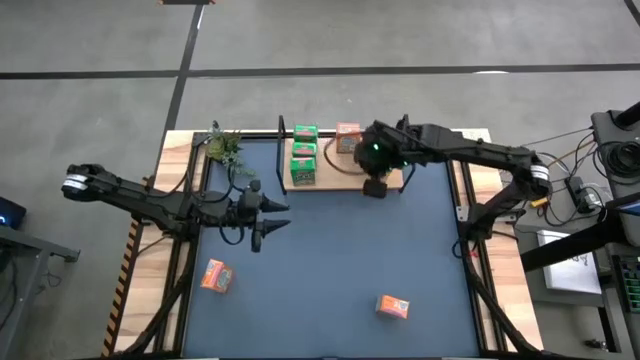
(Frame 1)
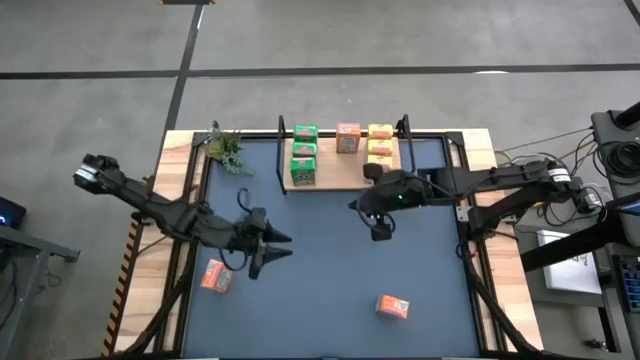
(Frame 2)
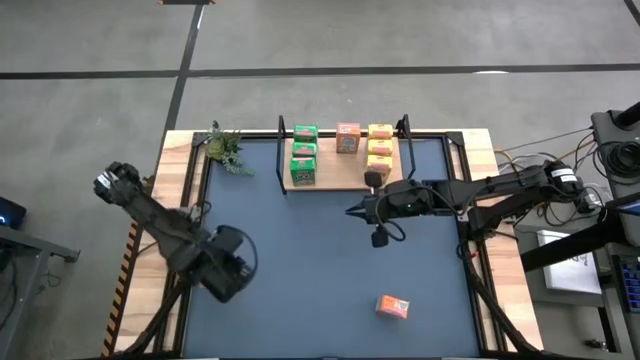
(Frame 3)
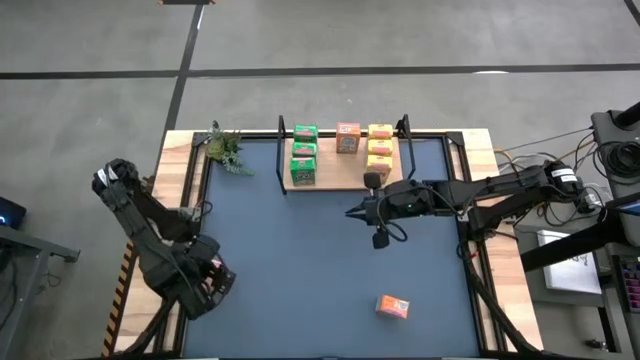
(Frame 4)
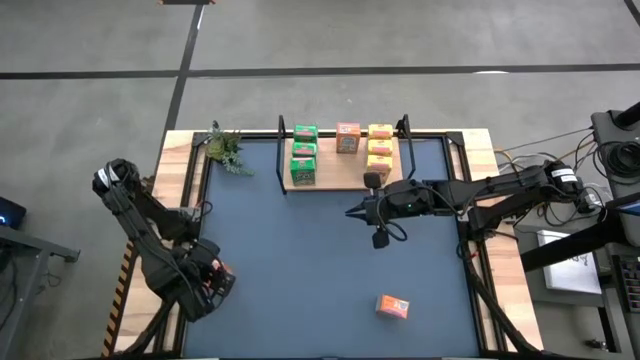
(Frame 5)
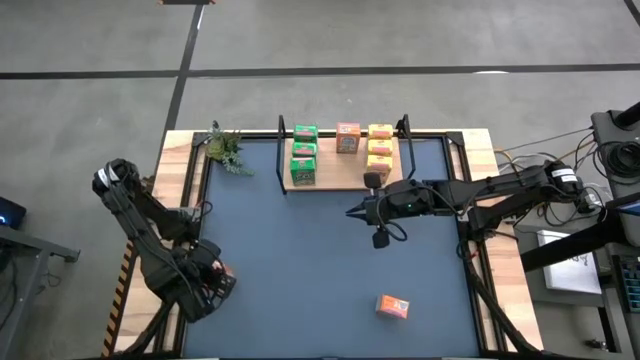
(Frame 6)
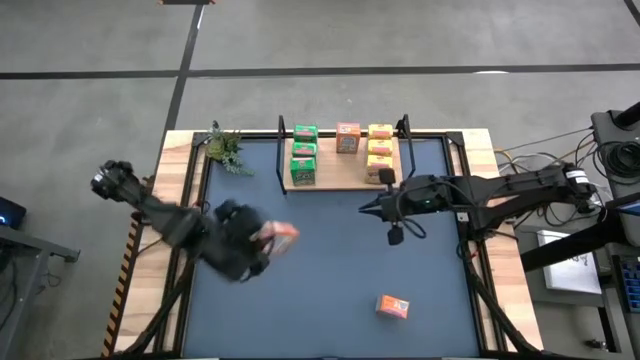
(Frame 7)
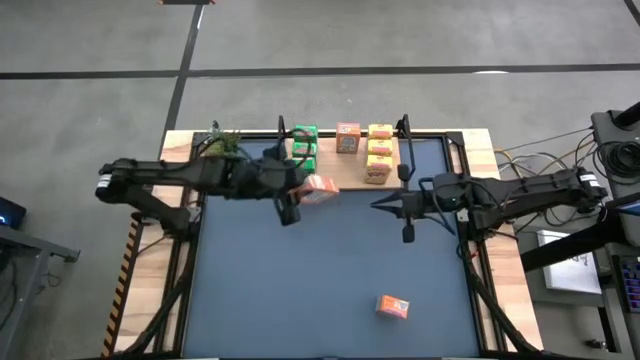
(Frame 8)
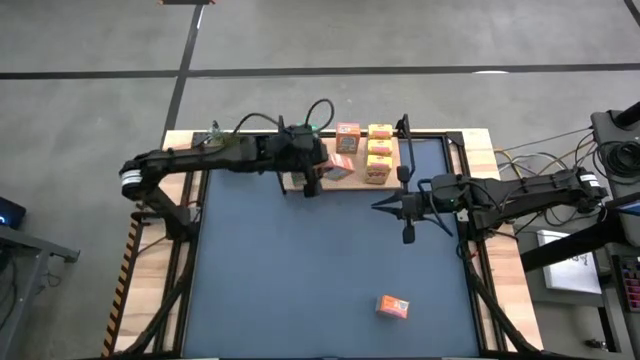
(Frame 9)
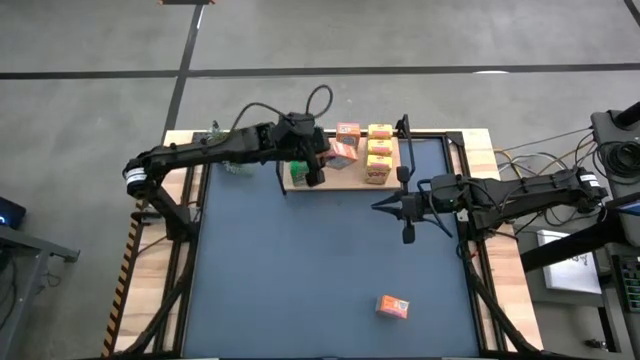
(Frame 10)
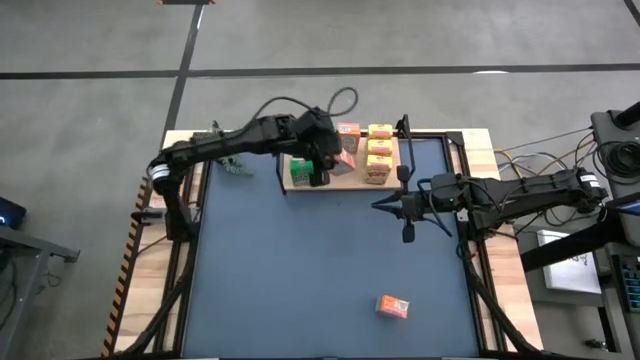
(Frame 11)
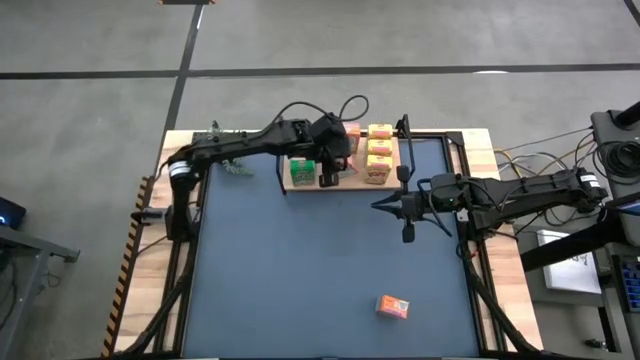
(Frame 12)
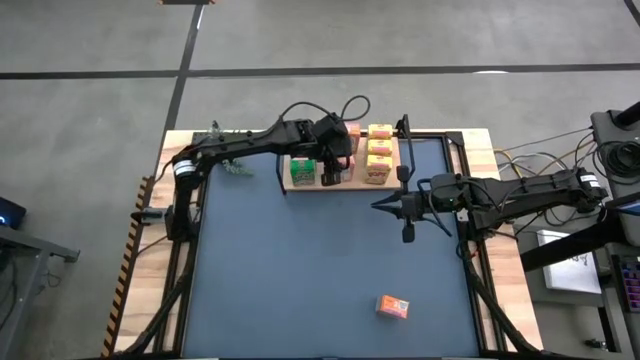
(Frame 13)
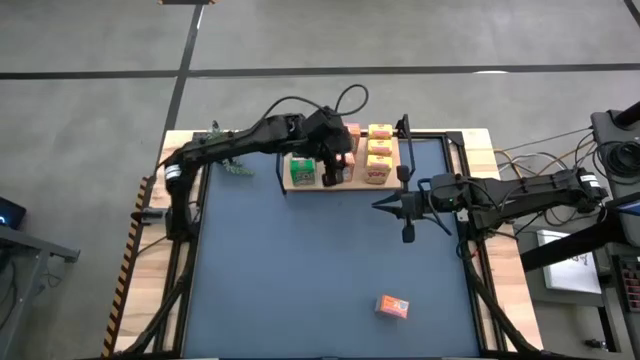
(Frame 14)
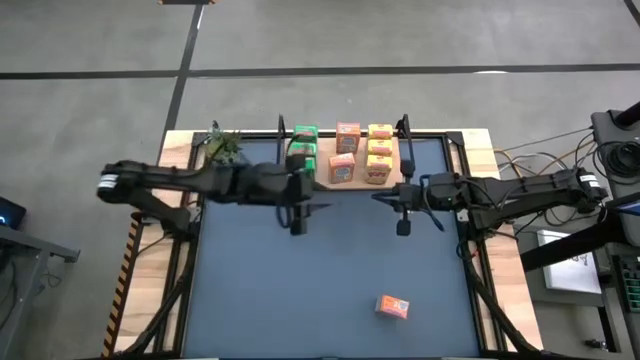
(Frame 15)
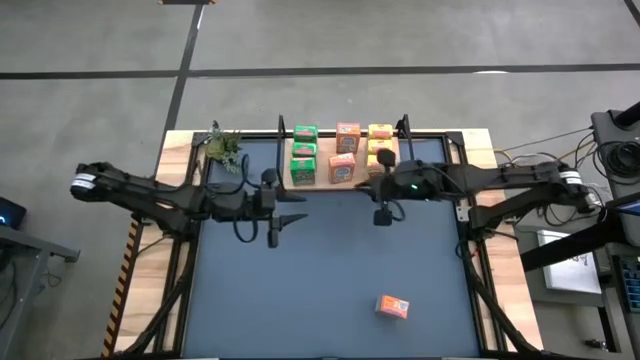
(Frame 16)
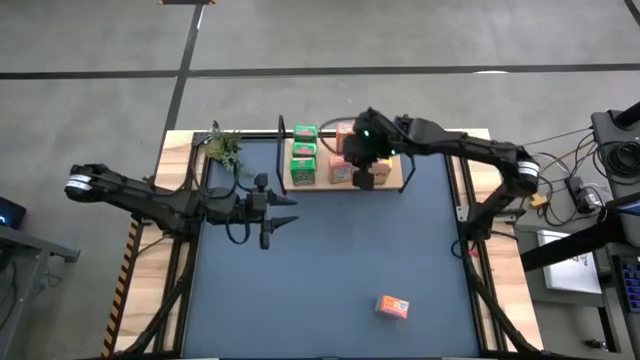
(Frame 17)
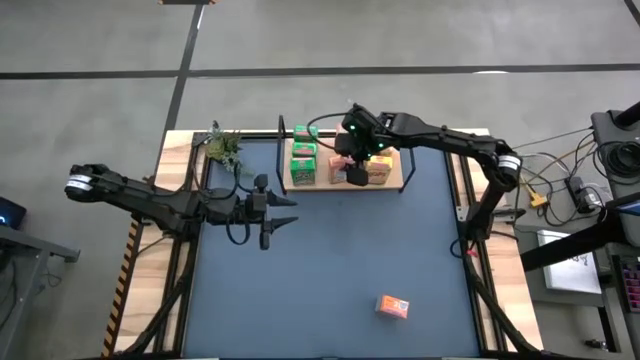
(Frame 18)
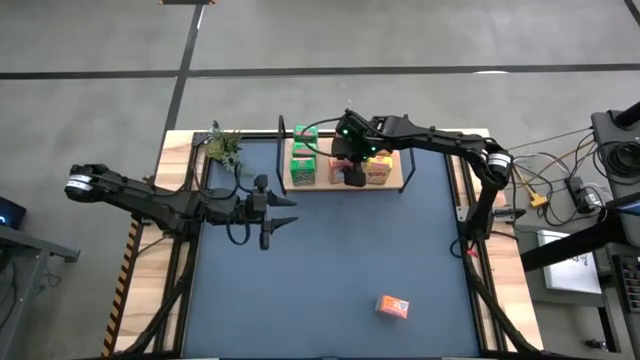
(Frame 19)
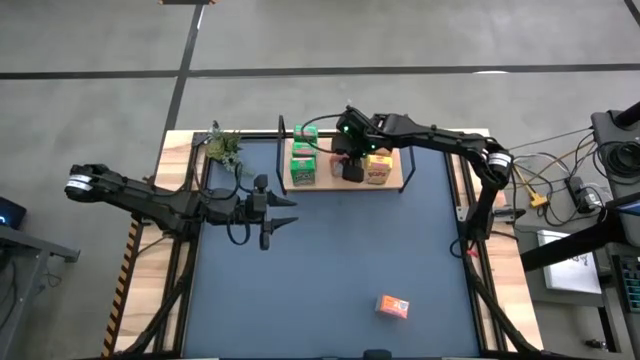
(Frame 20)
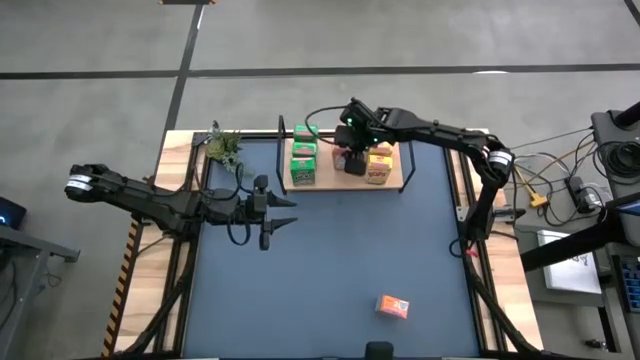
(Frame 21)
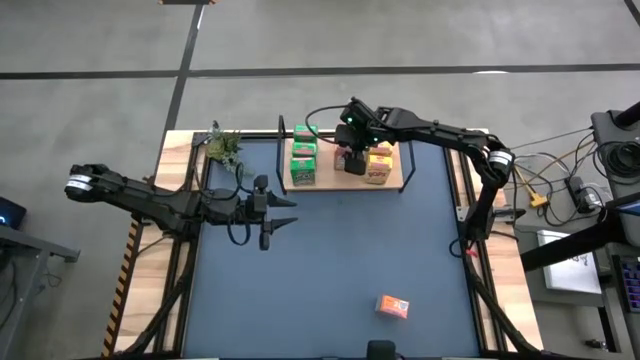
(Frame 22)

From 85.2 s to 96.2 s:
Task: Stack cereal on shelf
Stack the left orange cereal box on the shelf

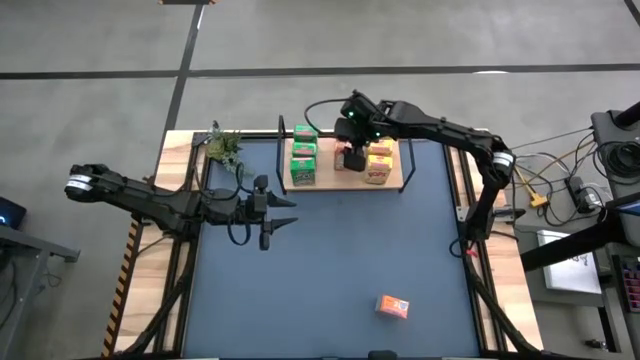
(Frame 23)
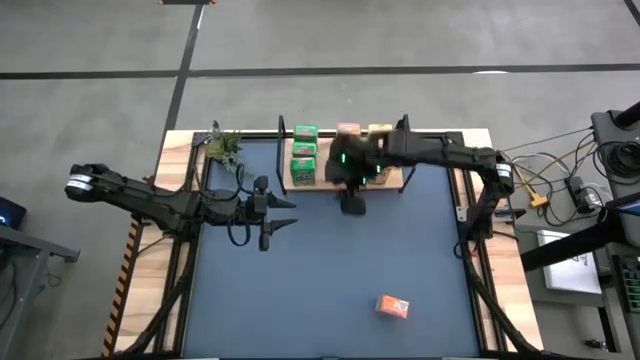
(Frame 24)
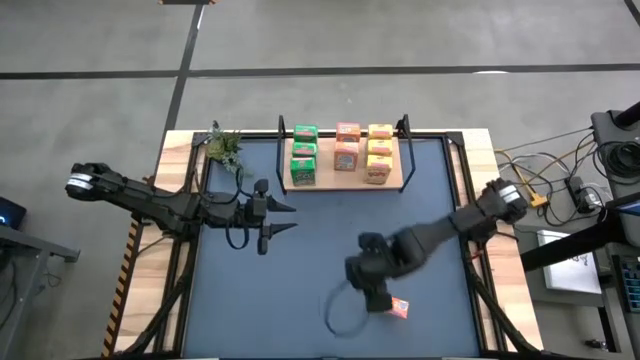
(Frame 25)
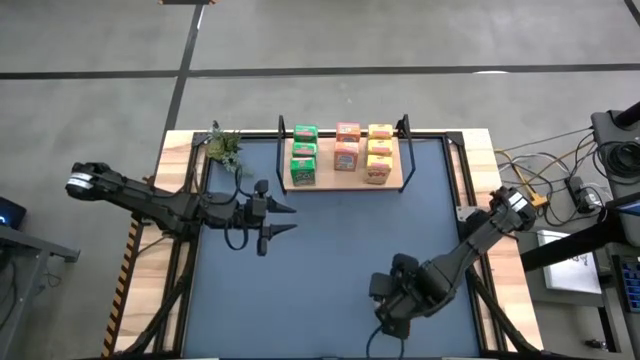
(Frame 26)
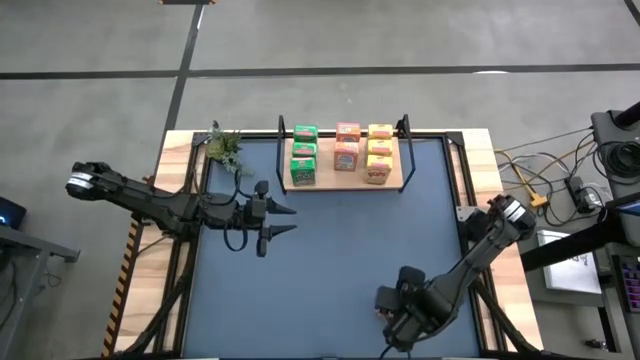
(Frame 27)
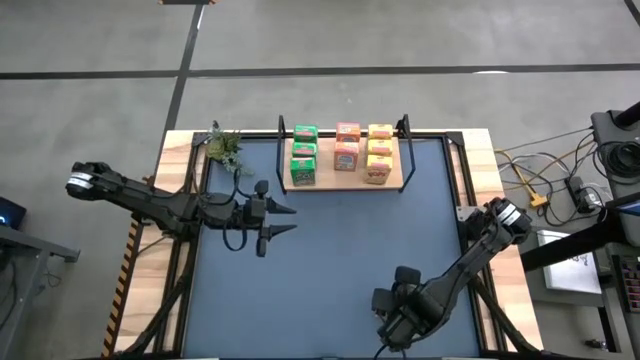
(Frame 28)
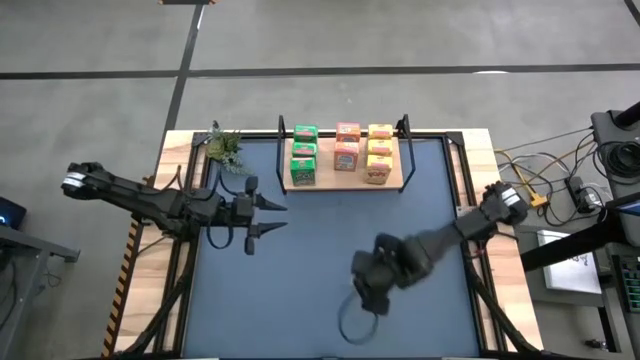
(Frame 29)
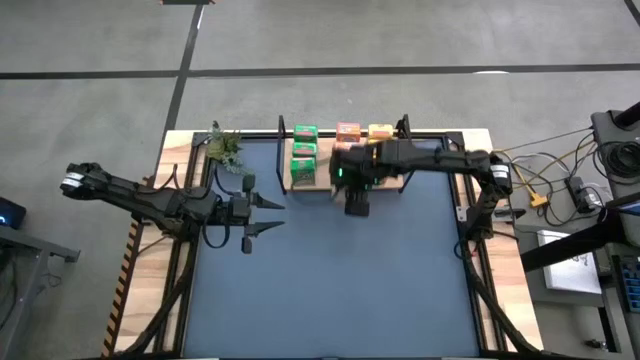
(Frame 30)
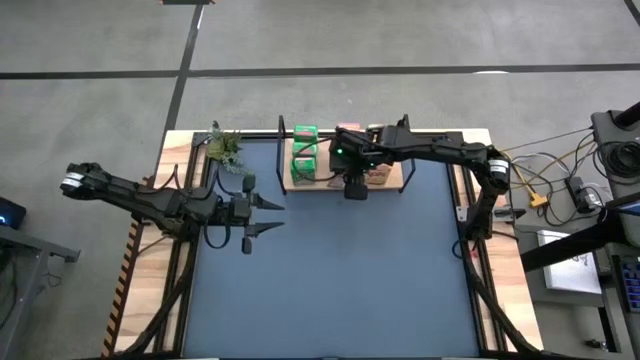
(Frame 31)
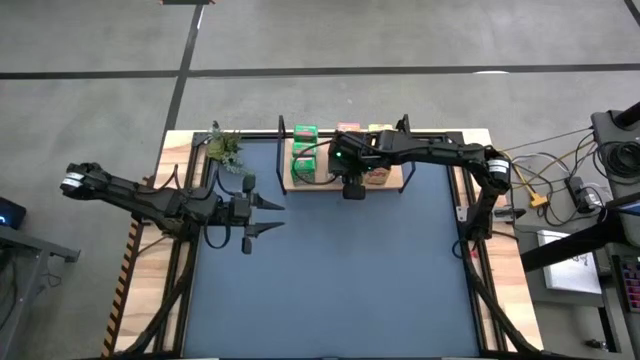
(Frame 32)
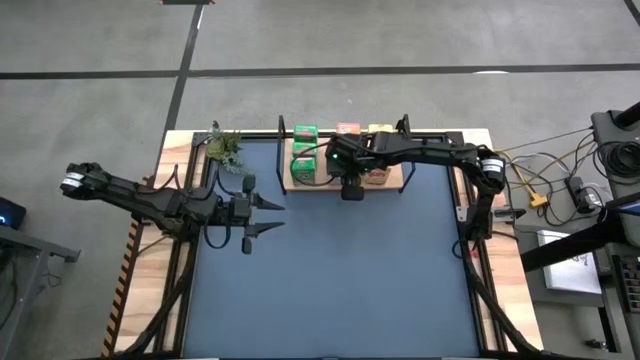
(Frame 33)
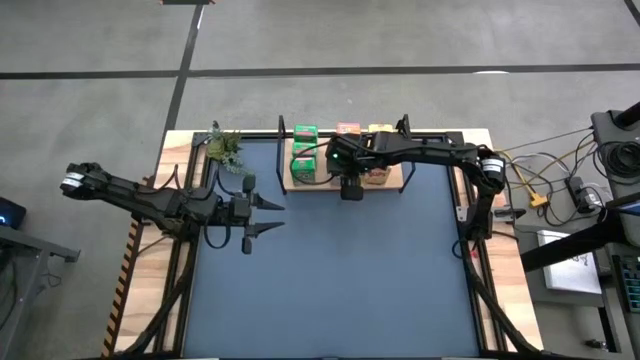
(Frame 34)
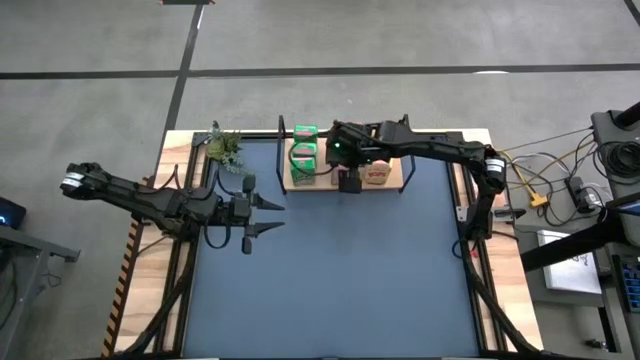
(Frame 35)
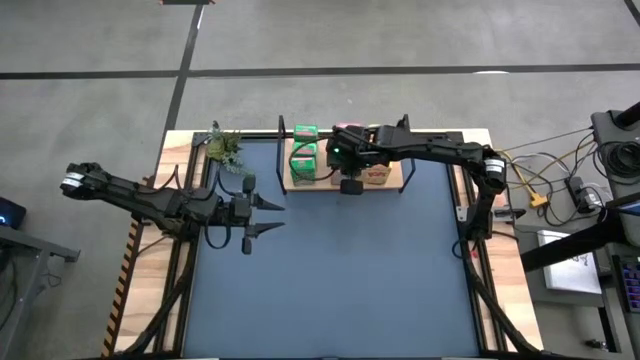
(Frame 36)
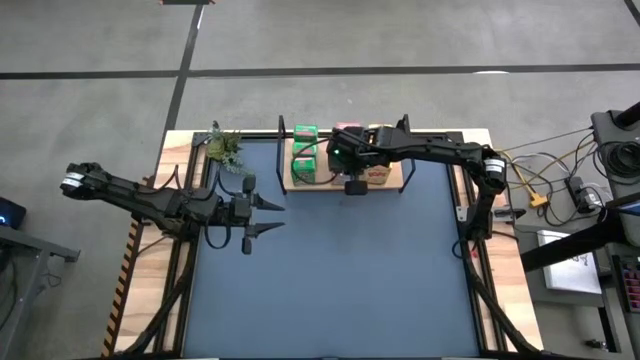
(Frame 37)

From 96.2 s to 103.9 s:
Stack the orange cereal box on the shelf

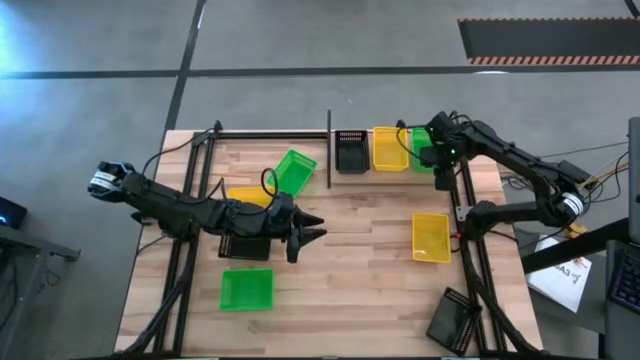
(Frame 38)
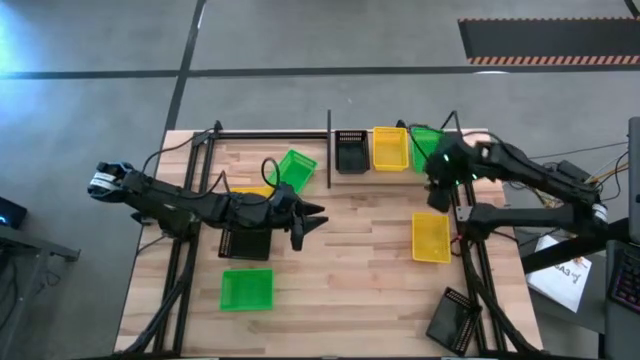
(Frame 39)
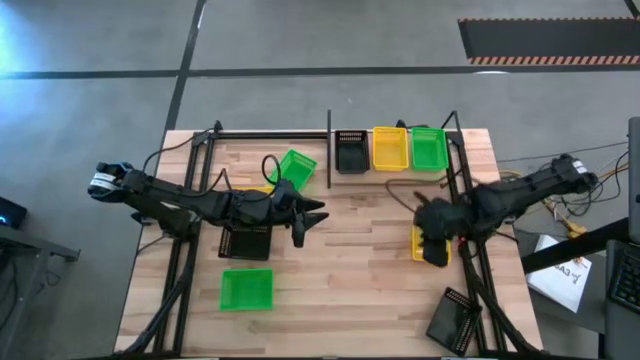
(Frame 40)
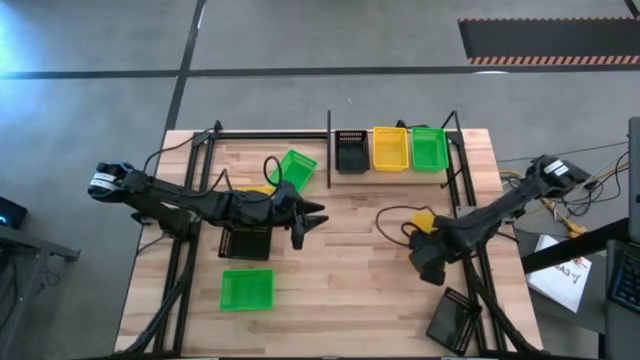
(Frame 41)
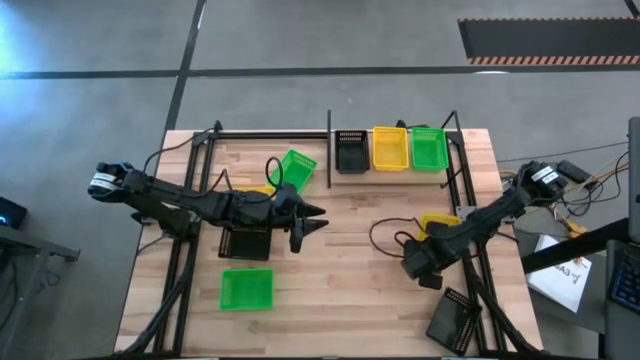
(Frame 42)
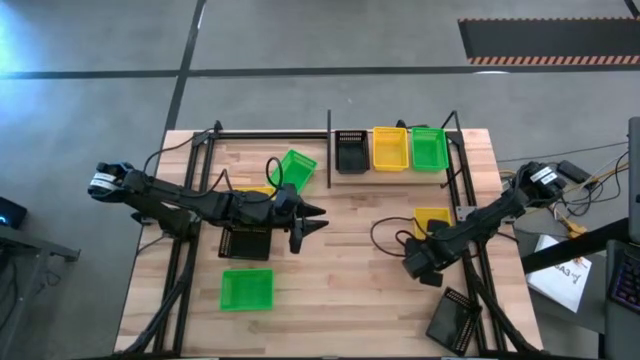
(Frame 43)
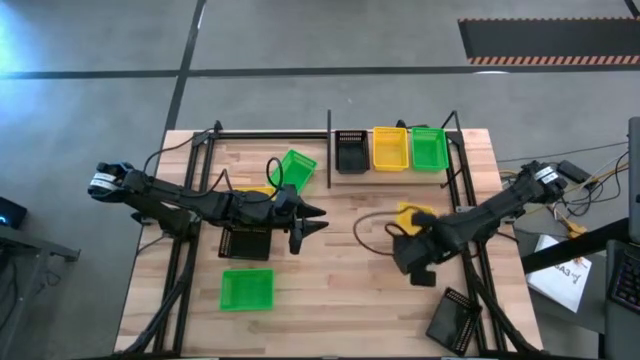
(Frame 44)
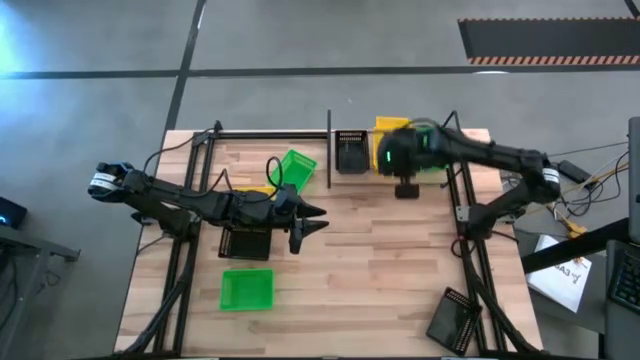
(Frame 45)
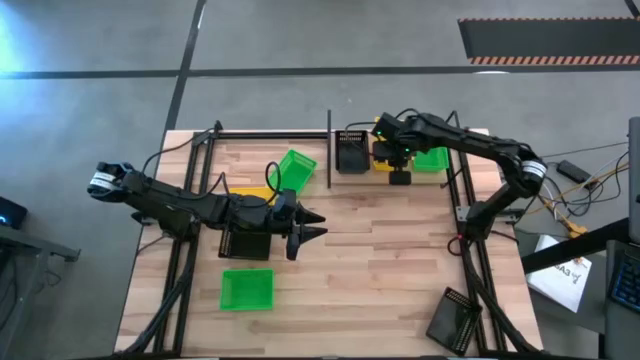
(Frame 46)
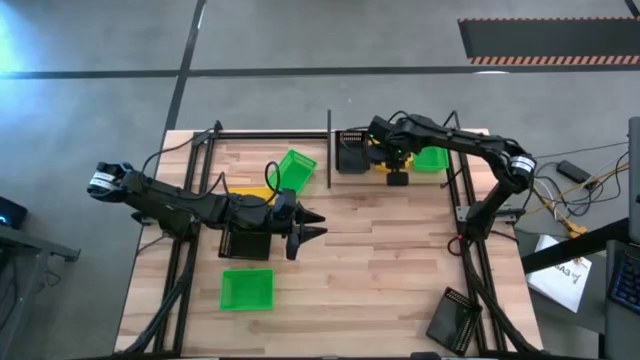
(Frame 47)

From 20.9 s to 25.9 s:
Task: Stack baskets on shelf by color
Stack the right yellow bin on top of the yellow bin on the shelf
